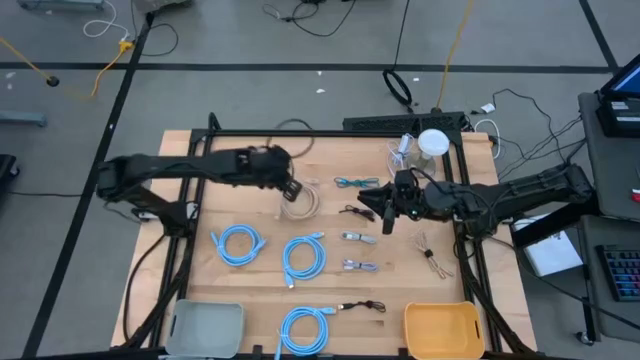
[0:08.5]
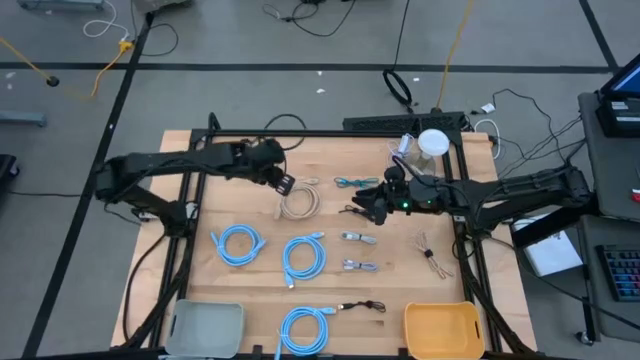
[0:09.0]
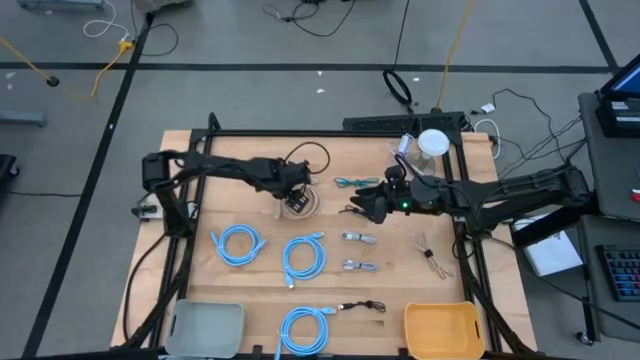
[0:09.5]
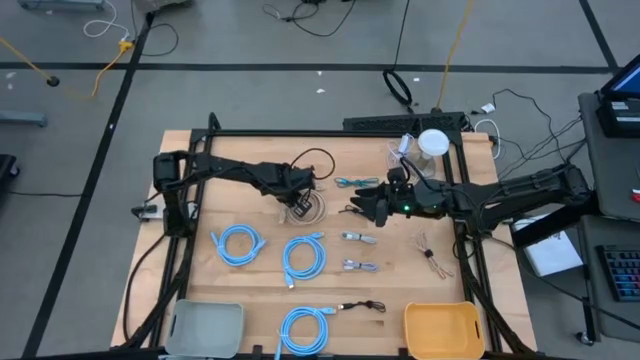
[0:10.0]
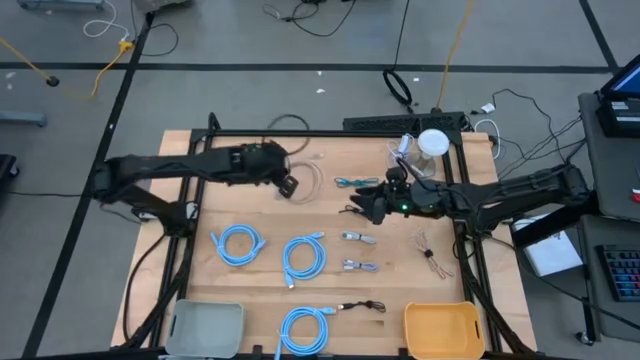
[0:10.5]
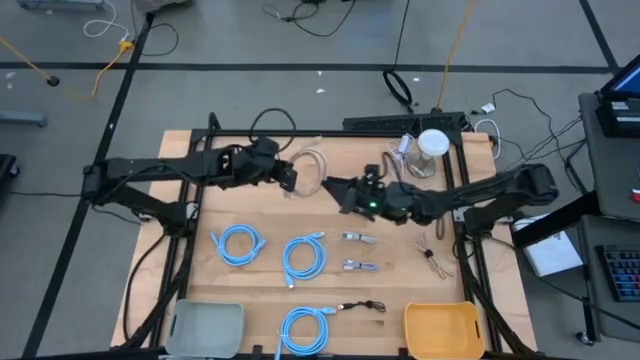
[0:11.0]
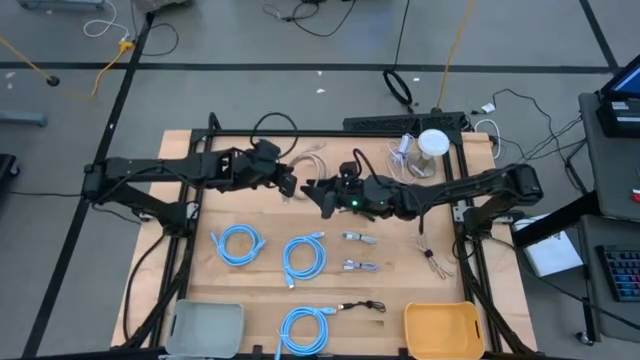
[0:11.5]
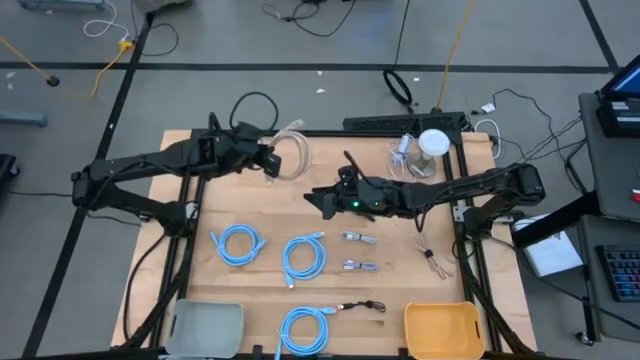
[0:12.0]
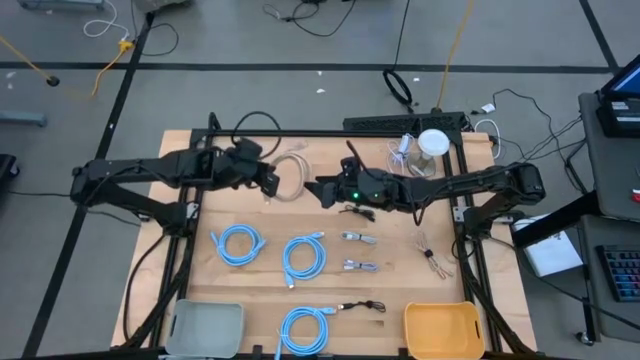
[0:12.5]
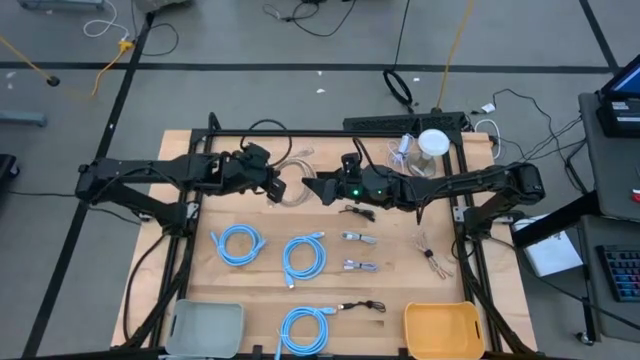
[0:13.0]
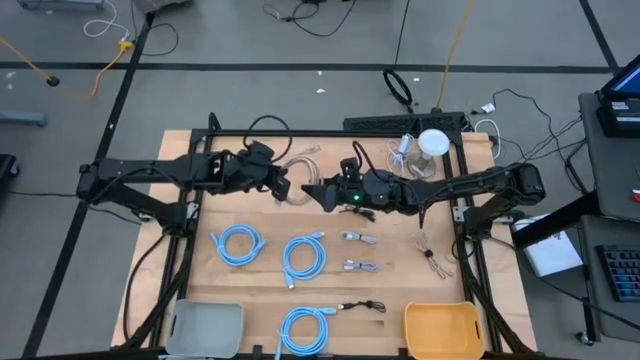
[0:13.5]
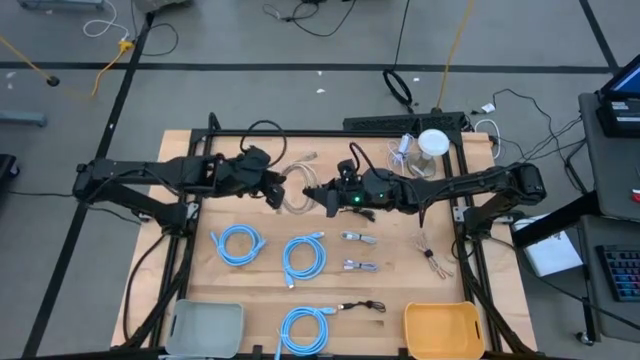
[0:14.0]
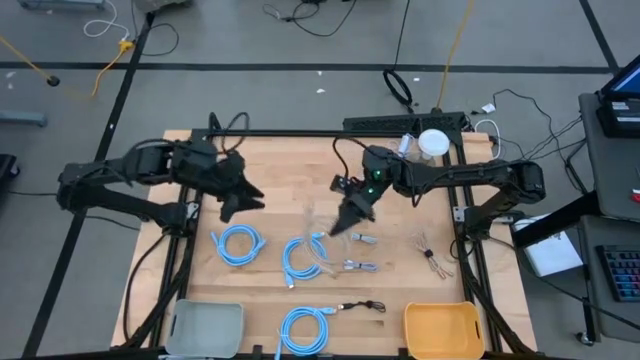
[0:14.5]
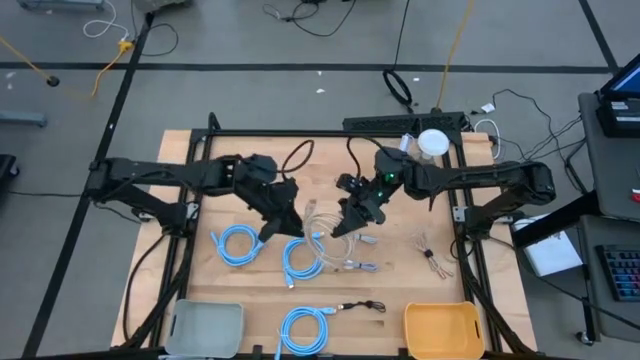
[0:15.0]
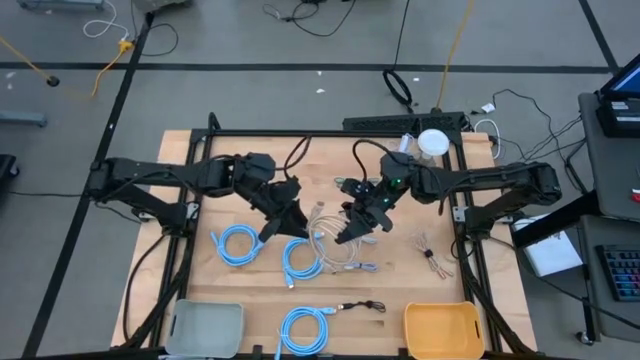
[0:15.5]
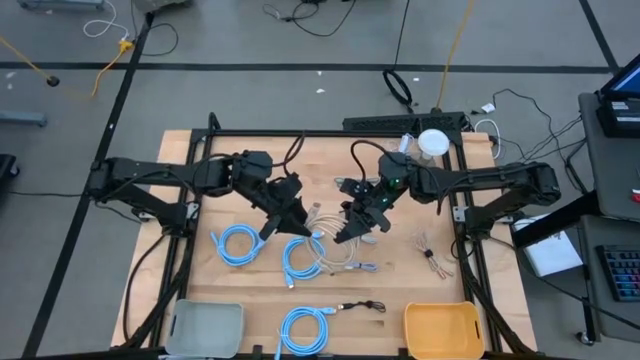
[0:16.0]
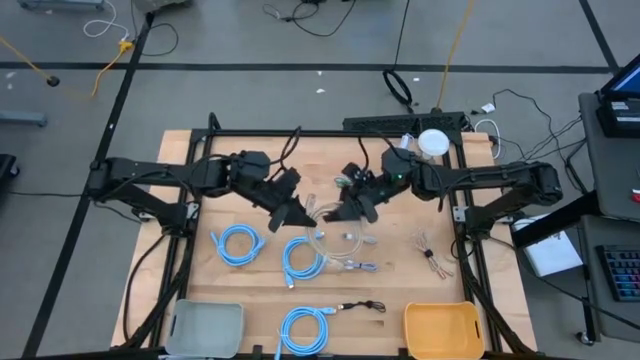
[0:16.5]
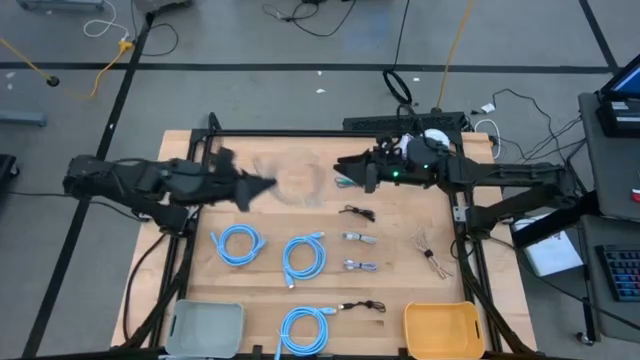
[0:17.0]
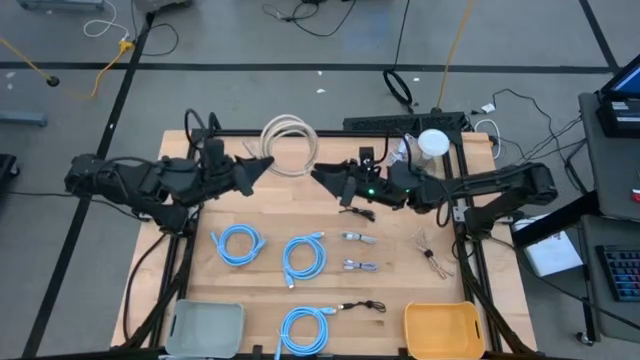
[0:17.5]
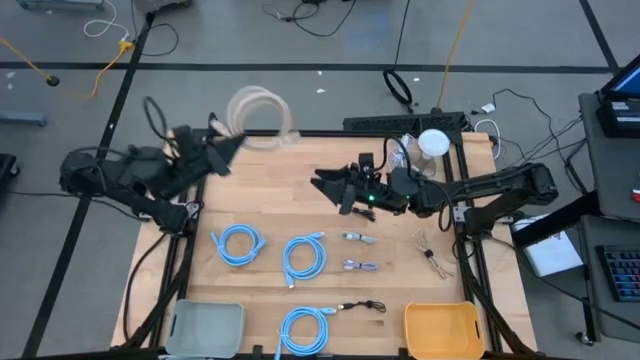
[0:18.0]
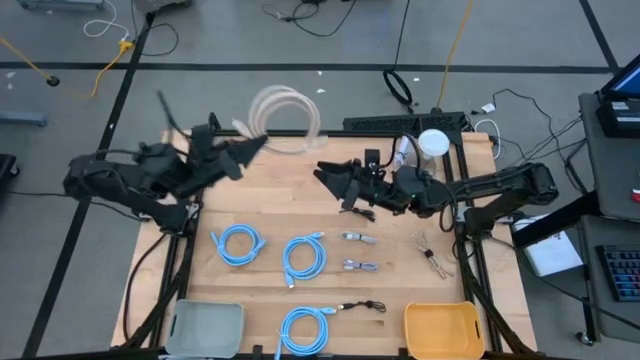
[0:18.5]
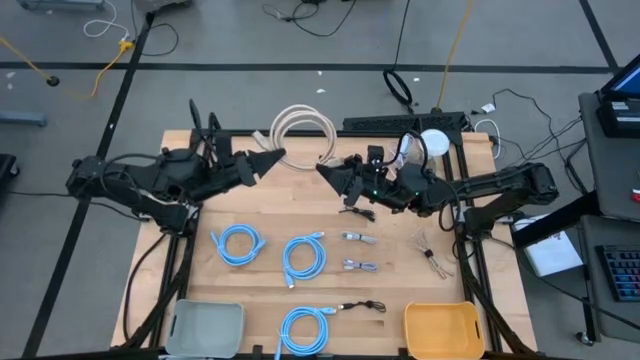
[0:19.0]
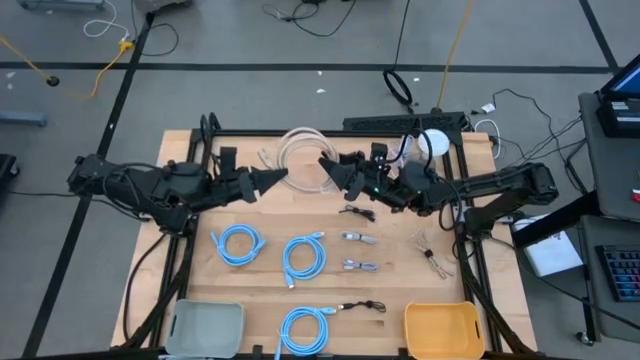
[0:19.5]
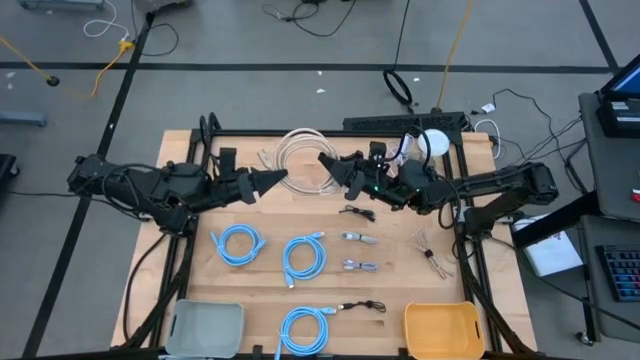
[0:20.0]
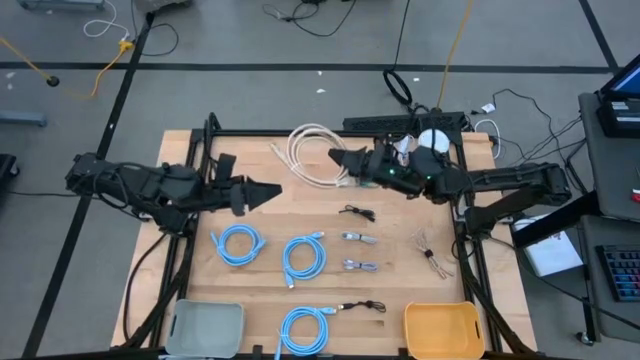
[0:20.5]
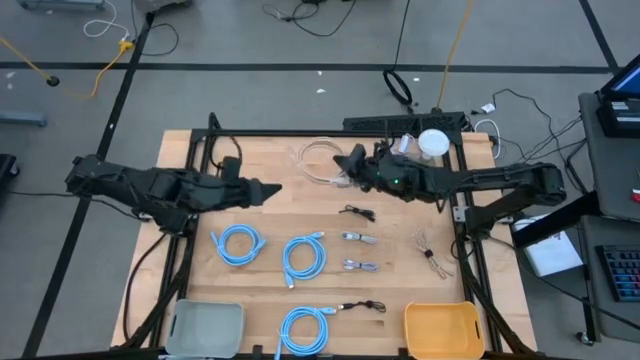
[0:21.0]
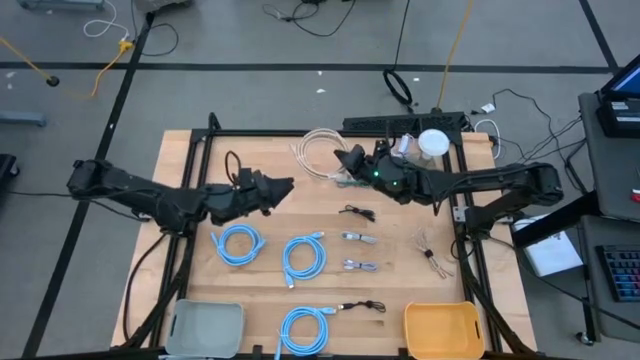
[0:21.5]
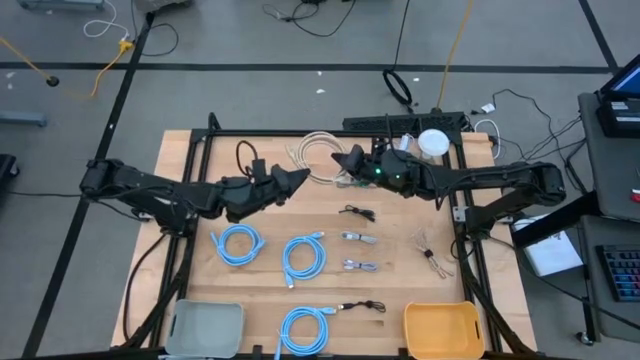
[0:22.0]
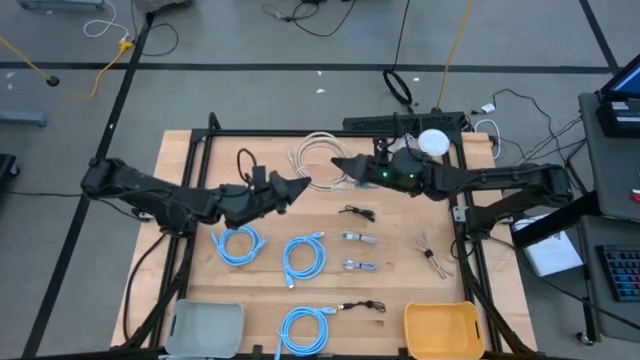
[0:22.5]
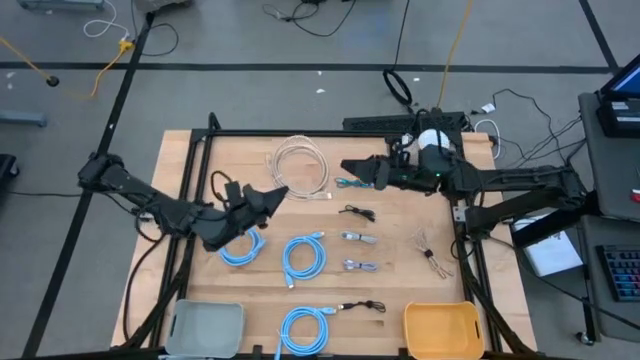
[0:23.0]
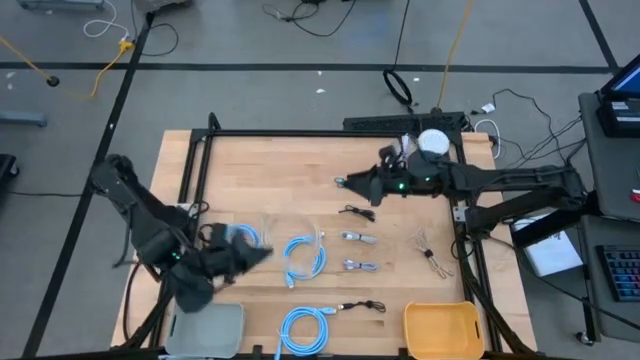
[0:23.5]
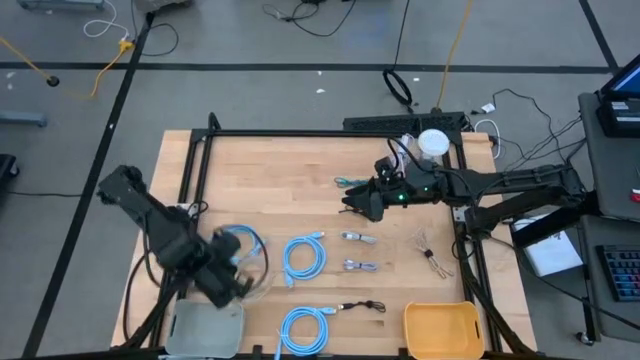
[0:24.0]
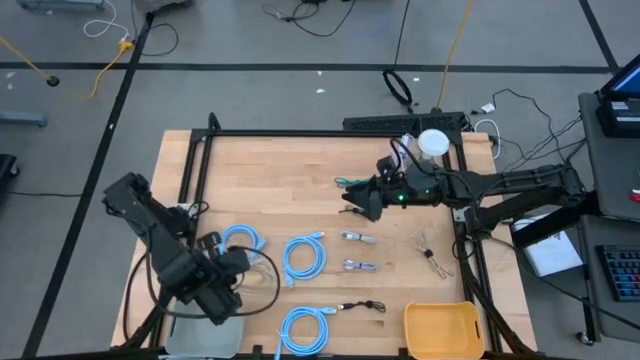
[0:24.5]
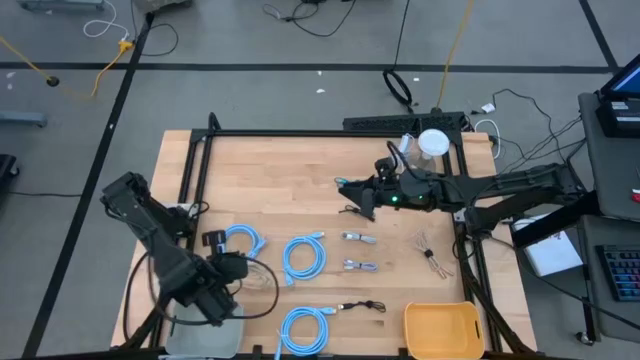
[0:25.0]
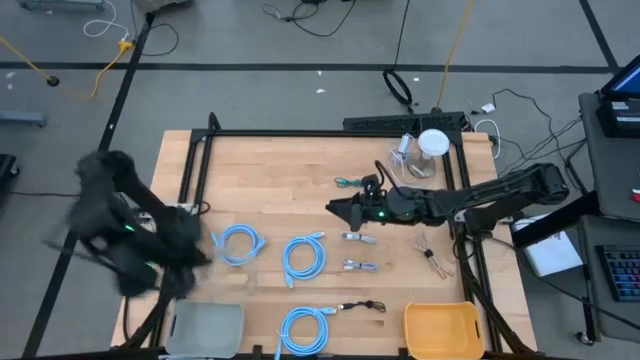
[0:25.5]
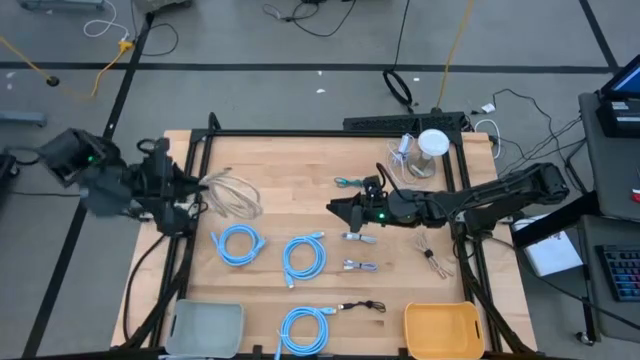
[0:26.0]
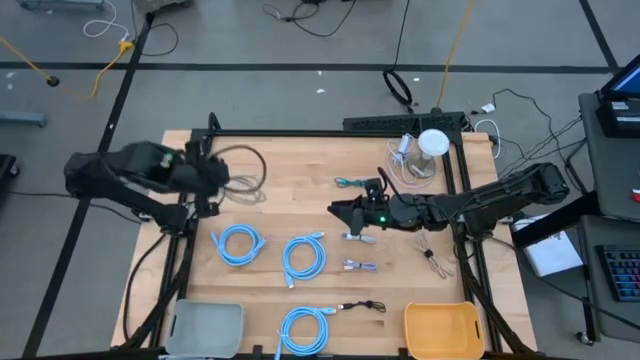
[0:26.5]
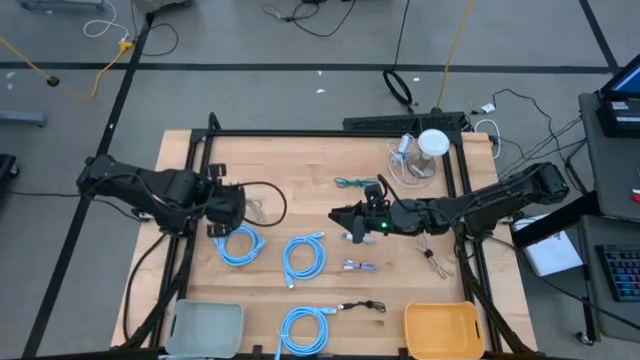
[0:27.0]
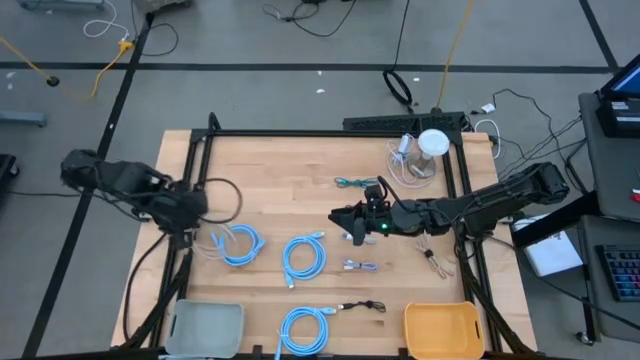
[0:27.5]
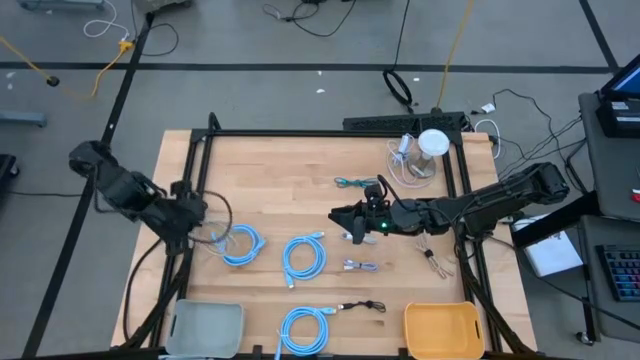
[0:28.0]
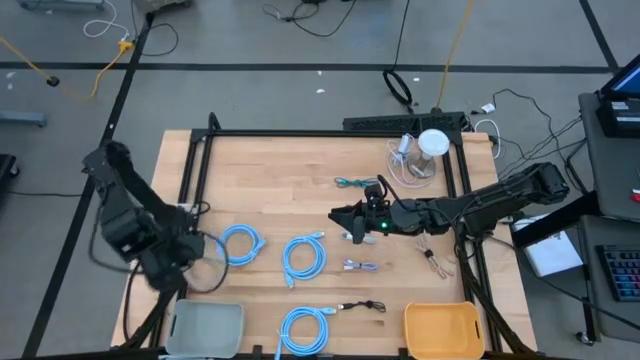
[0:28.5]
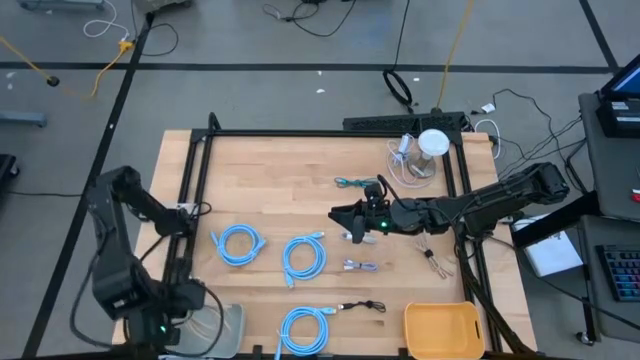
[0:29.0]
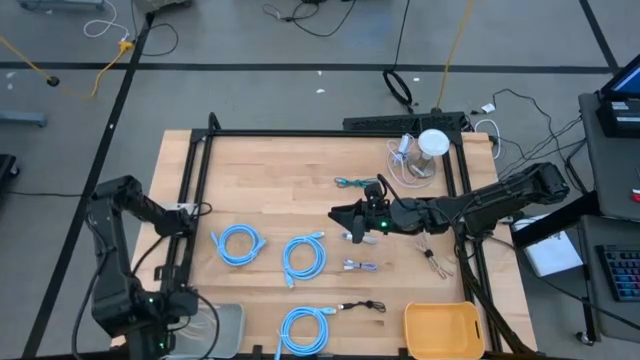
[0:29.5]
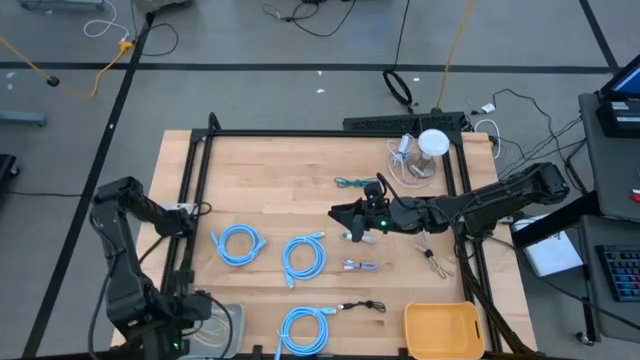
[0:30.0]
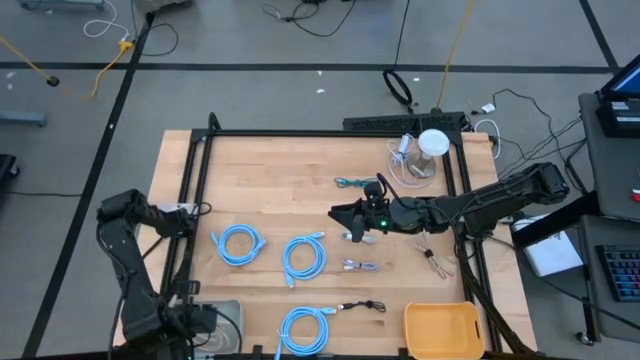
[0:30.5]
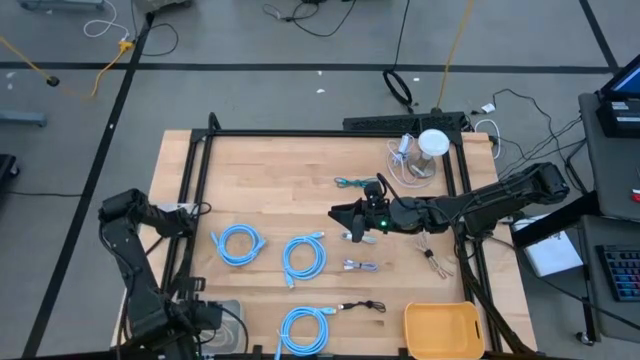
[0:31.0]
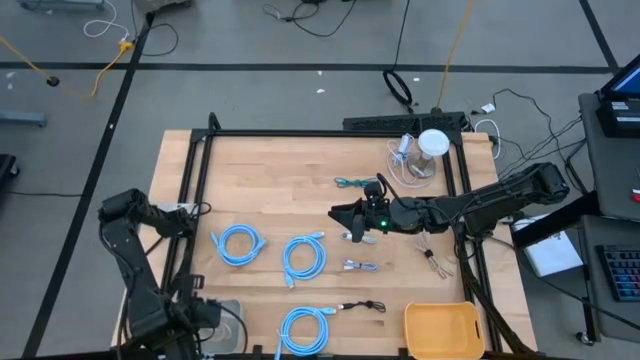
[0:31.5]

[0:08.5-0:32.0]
Task: Pick & Place USB Port
Put the brown HDMI cable into the gray bin
